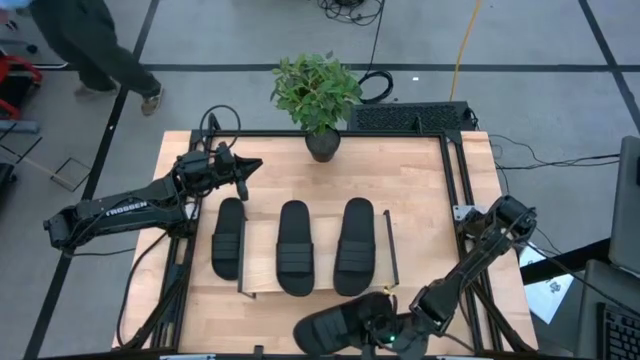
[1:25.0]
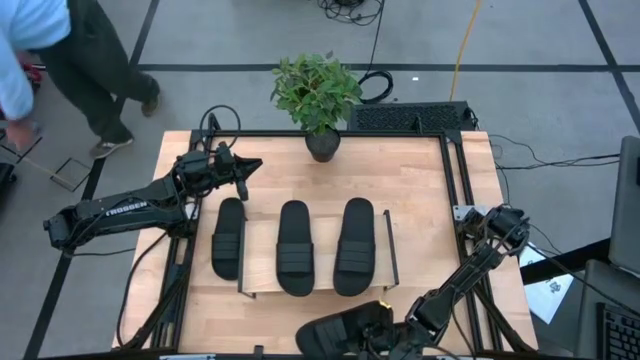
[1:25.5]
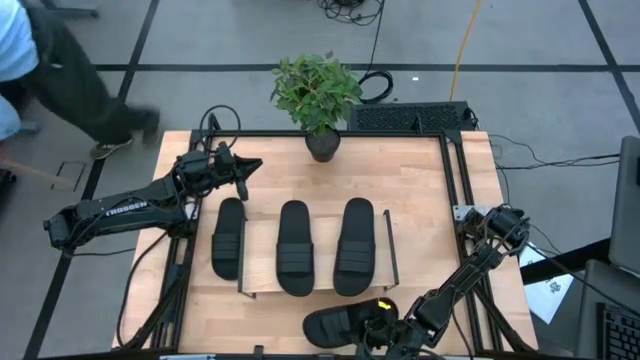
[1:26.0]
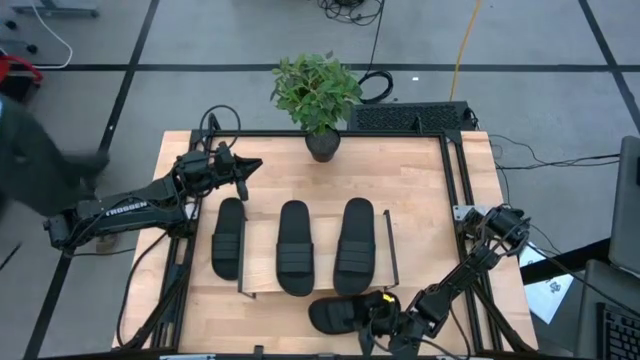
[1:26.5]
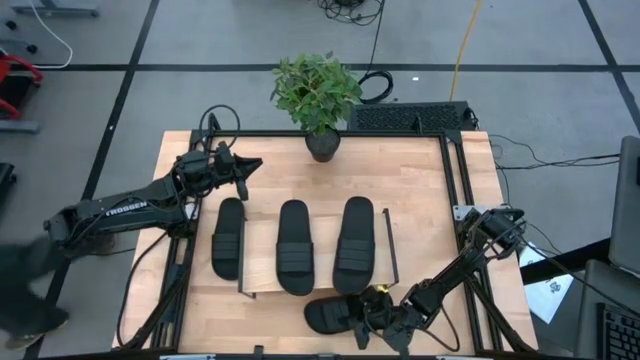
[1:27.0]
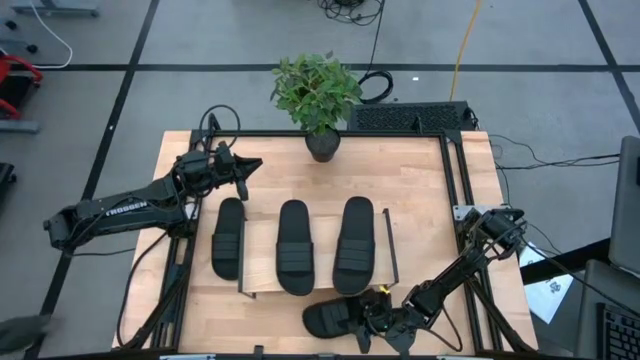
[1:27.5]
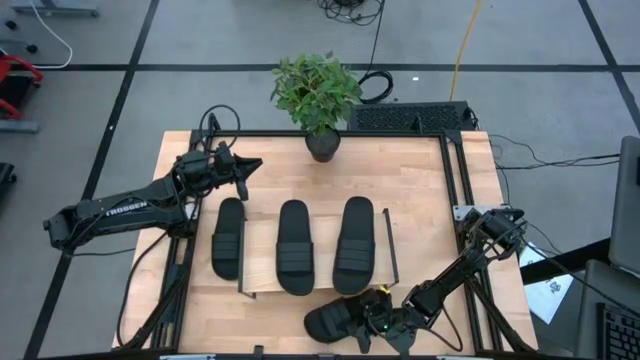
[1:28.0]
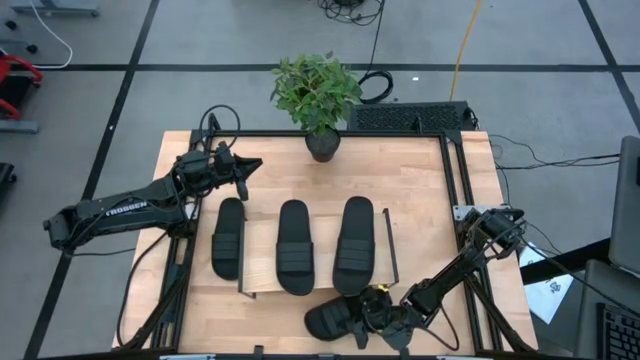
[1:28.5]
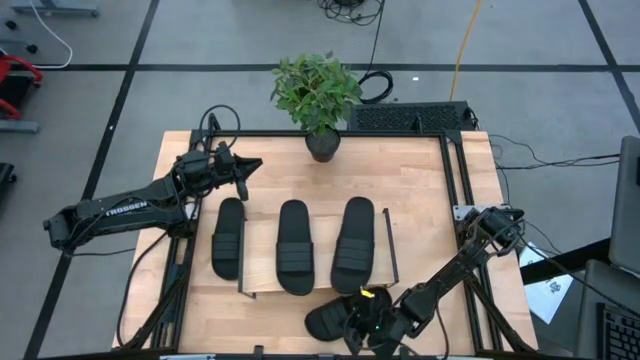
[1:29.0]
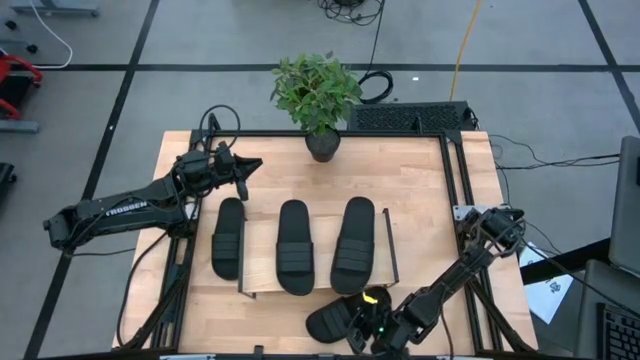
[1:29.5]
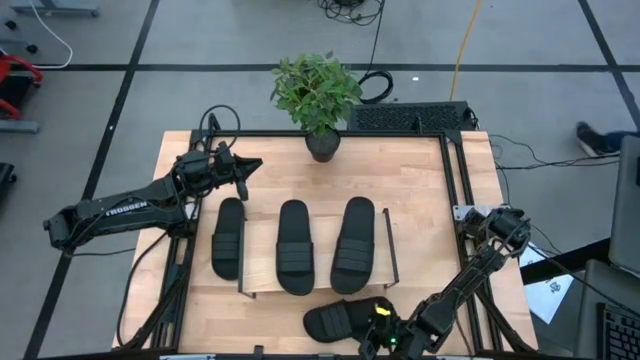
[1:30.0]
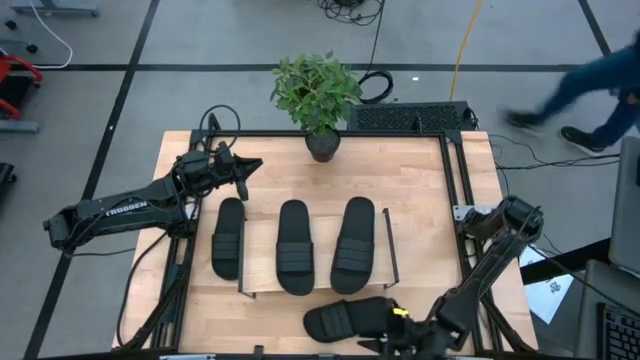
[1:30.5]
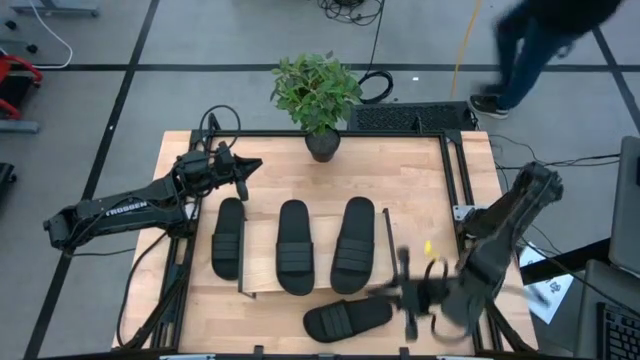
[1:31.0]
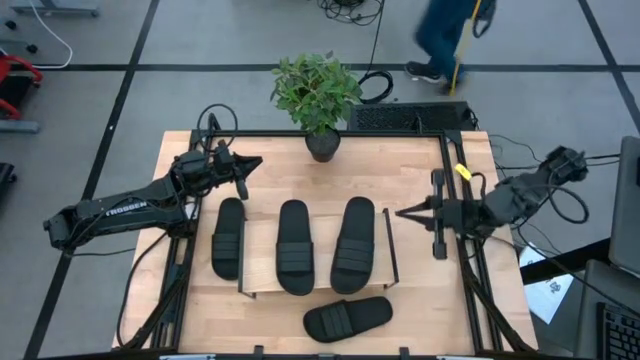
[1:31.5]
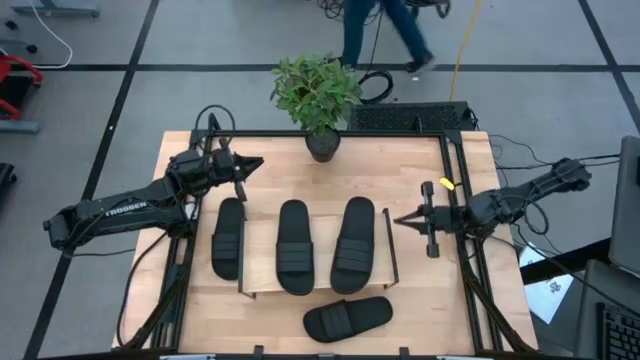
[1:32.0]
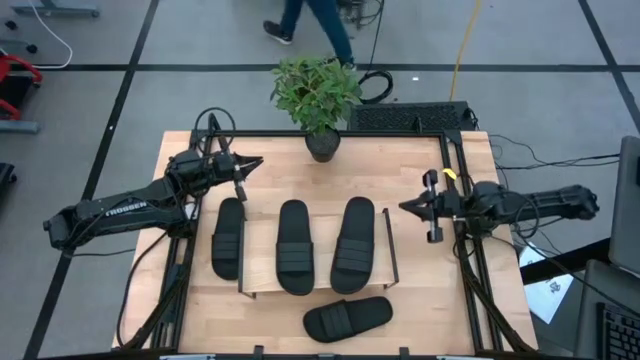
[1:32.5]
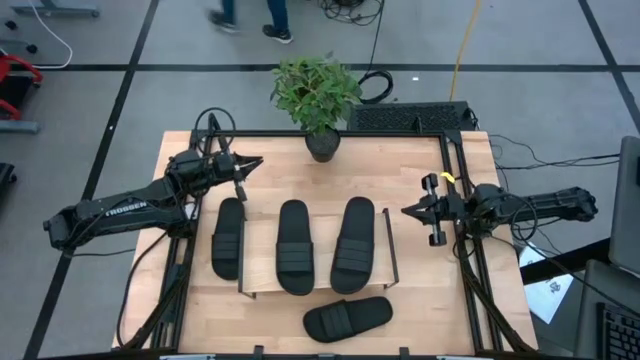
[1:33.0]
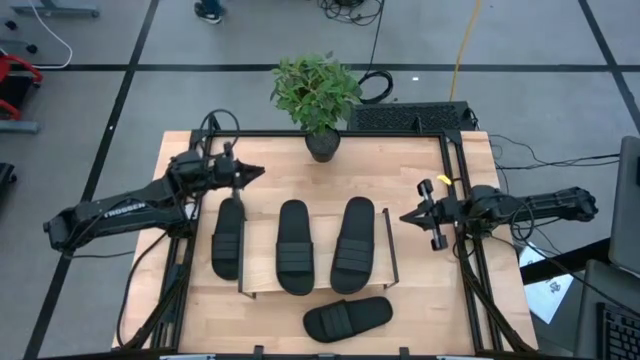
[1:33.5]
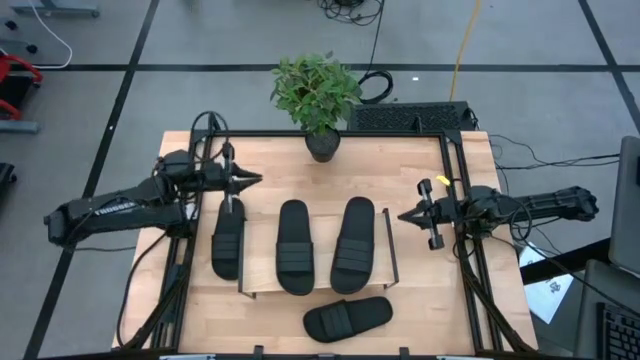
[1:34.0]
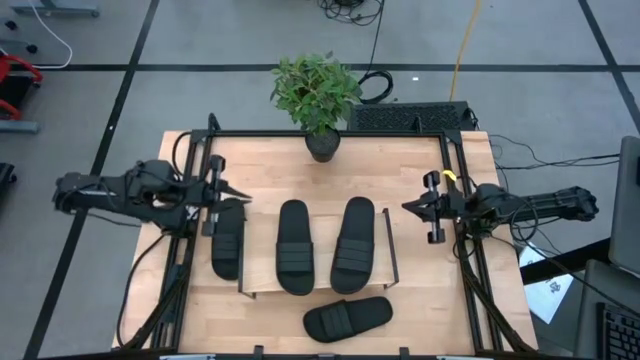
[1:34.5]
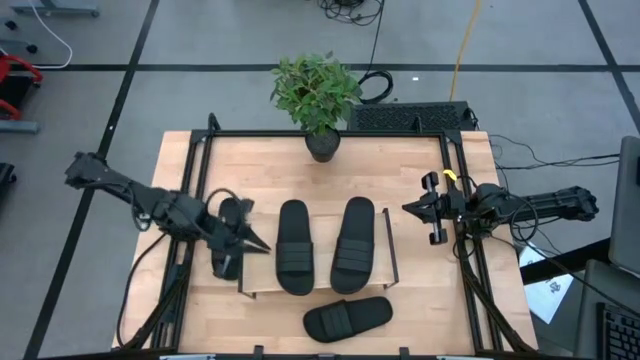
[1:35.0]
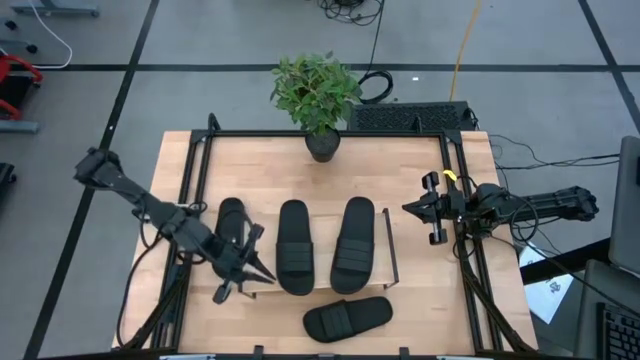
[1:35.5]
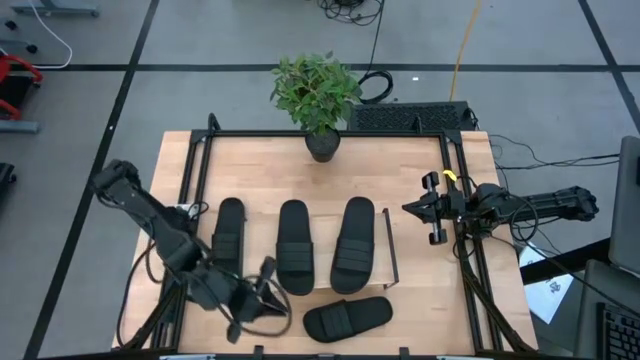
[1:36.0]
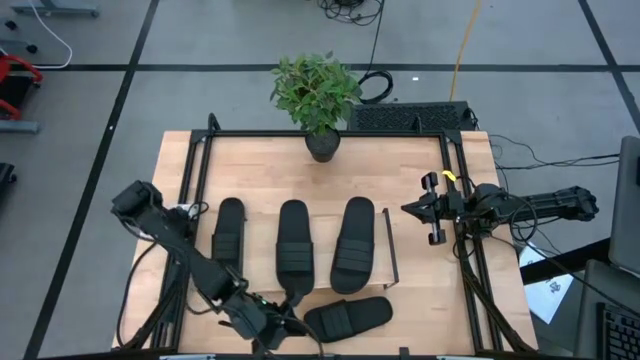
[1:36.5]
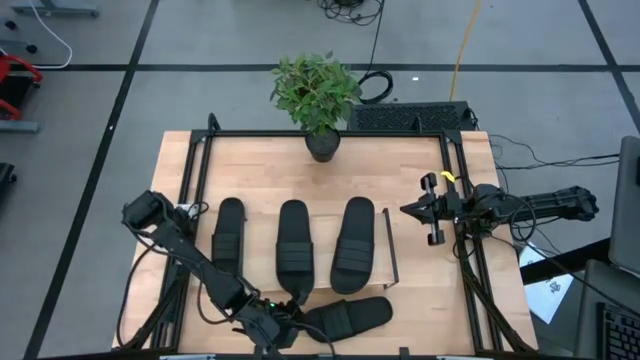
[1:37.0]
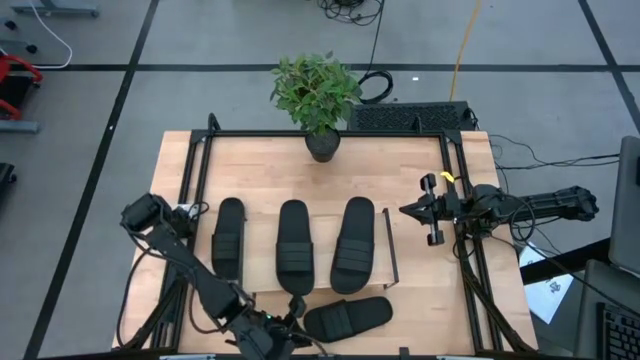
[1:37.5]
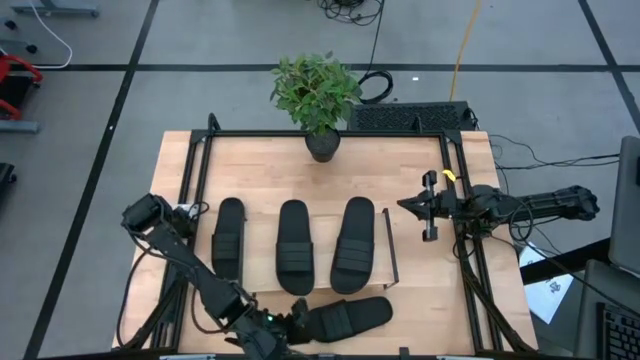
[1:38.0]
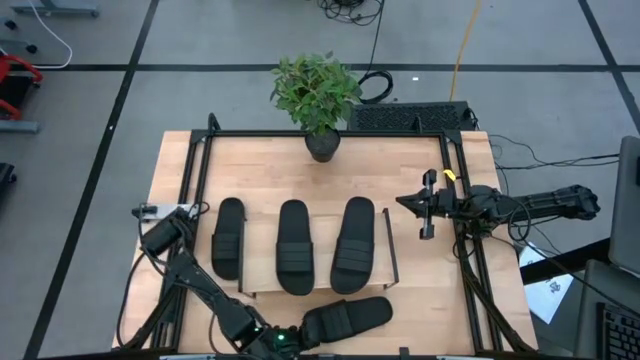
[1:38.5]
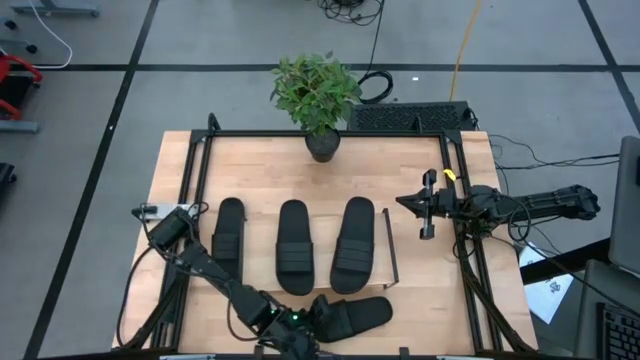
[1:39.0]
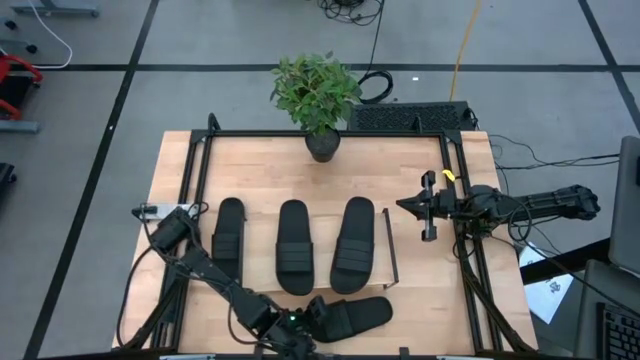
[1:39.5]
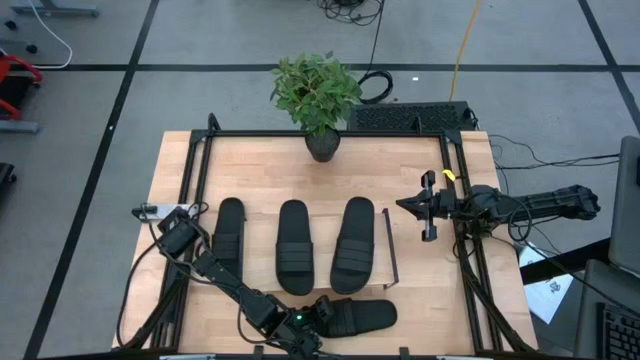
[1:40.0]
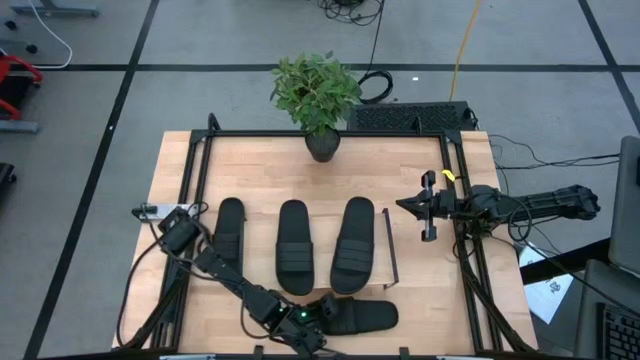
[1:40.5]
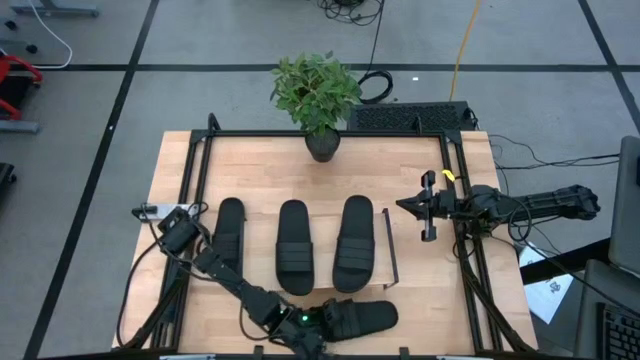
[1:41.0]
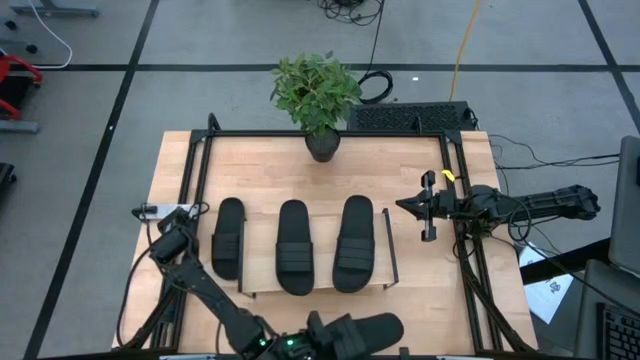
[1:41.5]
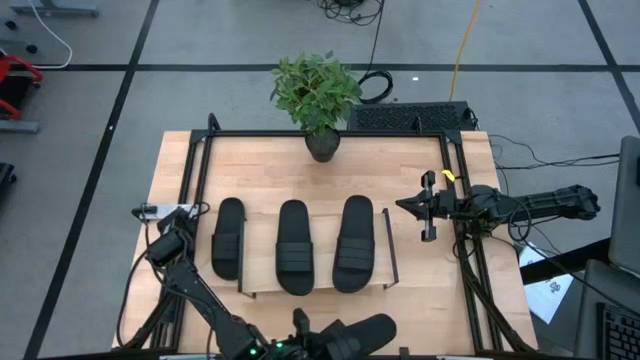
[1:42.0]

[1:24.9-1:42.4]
Task: Pick and place slides into the shelf
Put the black slipper under the shelf

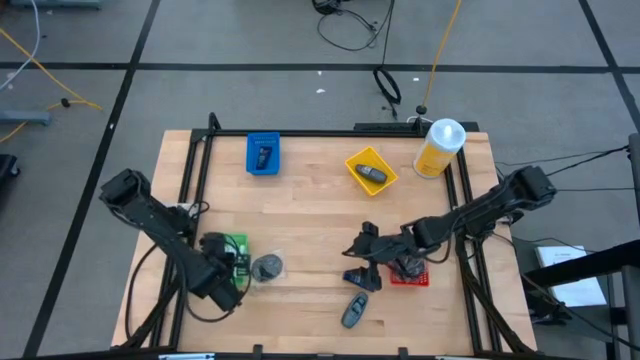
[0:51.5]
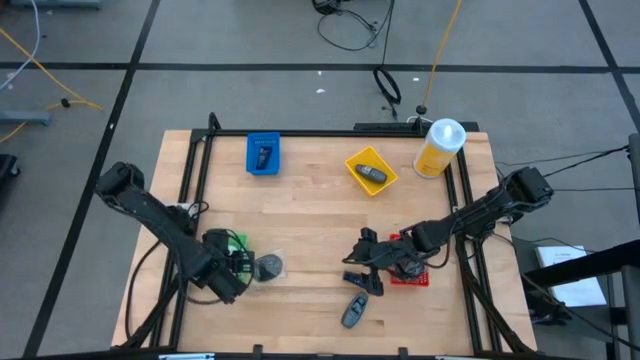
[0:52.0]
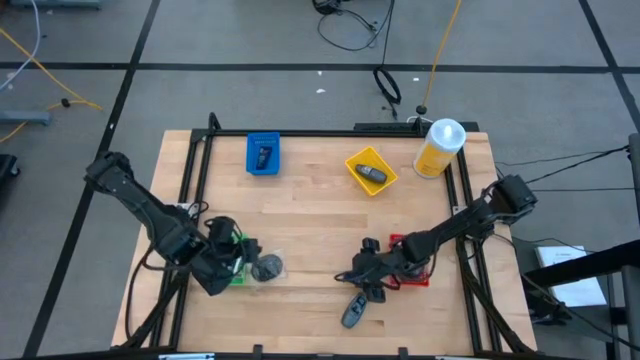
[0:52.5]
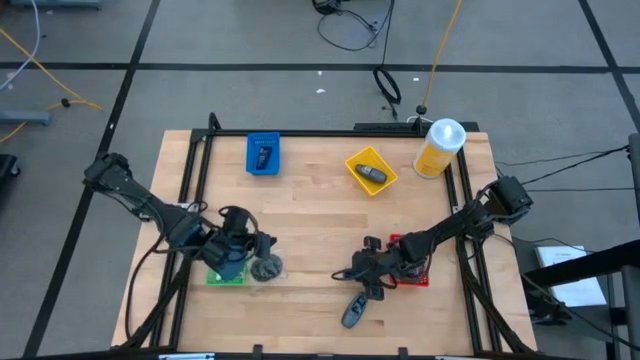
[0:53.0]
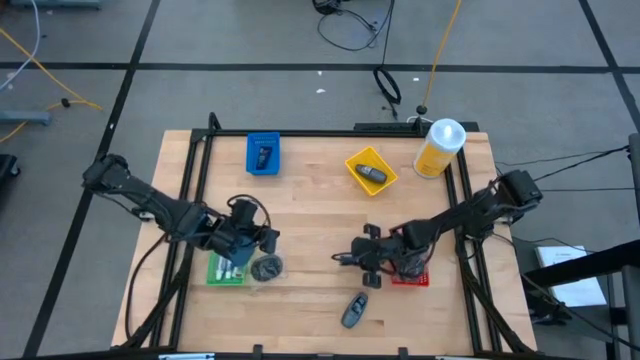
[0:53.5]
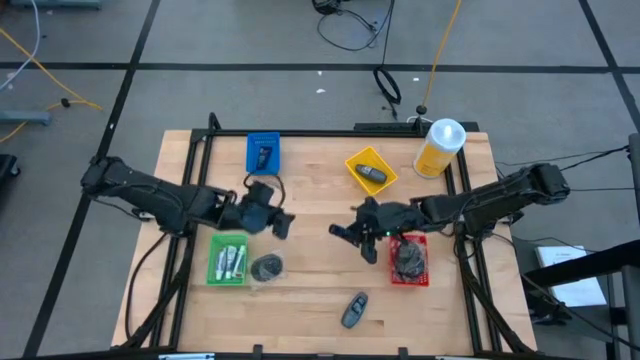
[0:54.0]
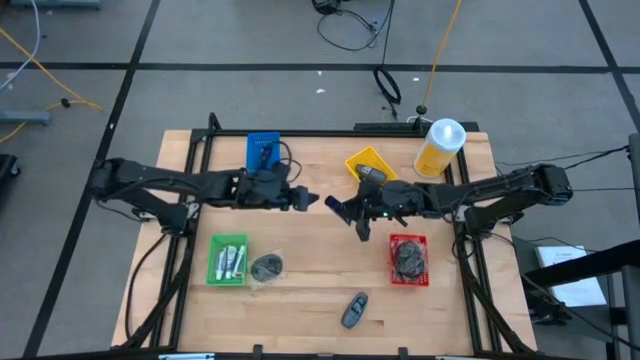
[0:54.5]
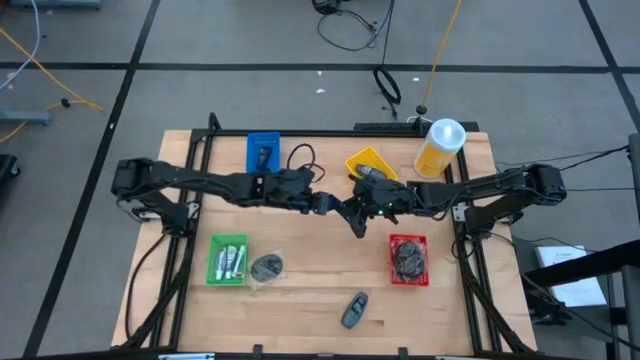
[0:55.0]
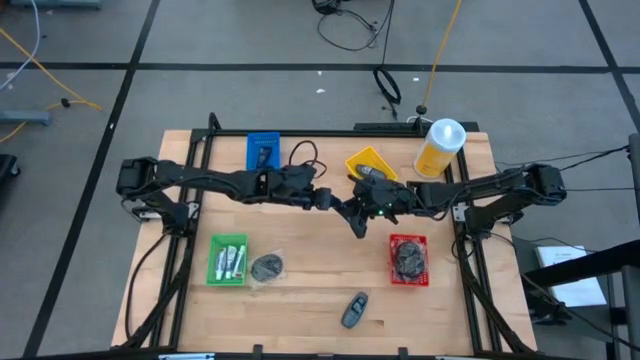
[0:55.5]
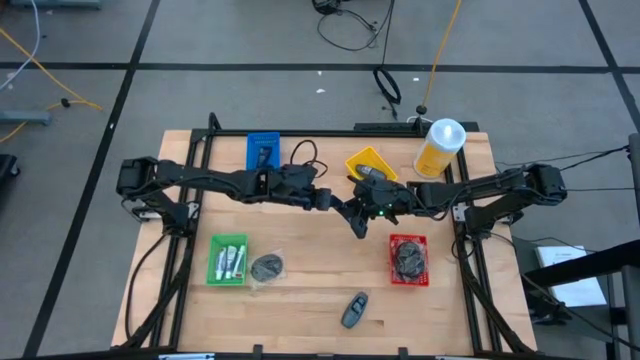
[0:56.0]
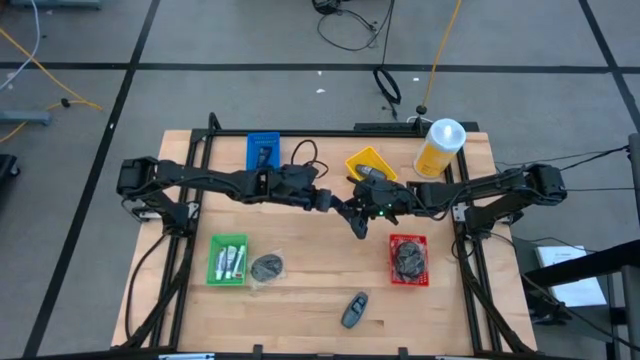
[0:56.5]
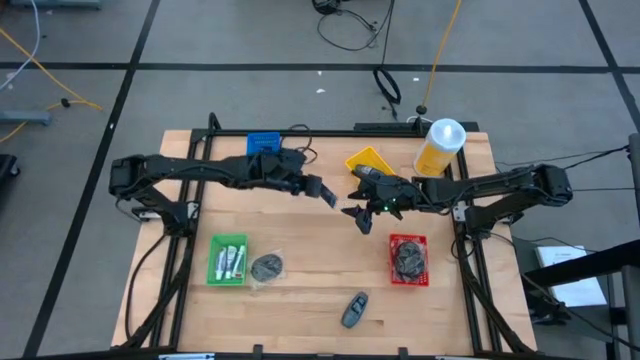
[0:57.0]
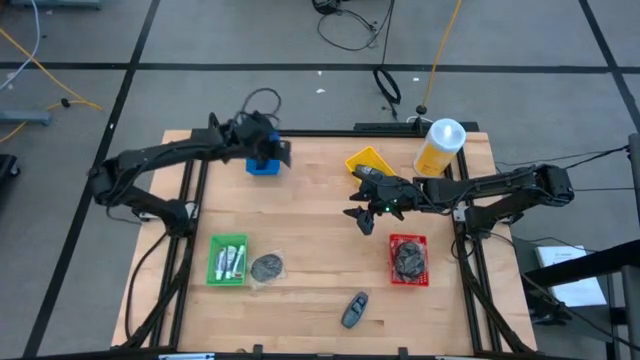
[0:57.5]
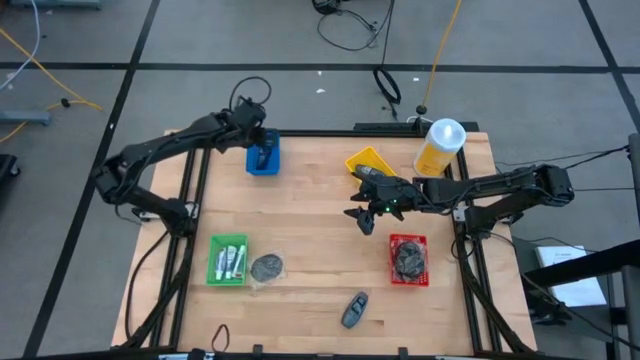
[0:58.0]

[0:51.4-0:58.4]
Task: Pick & Place Travel size toiletries
Put the dark blue shaving cream into the blue bin
